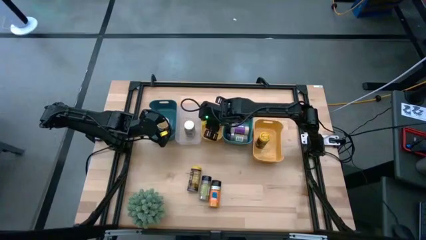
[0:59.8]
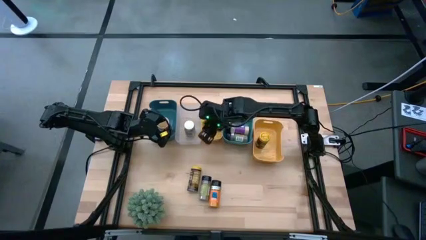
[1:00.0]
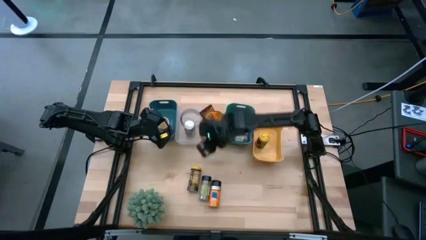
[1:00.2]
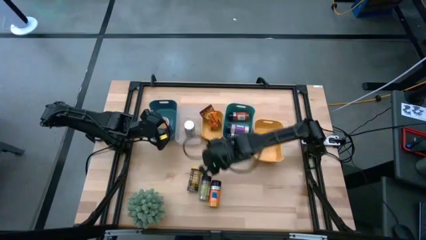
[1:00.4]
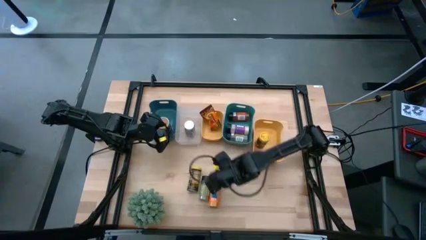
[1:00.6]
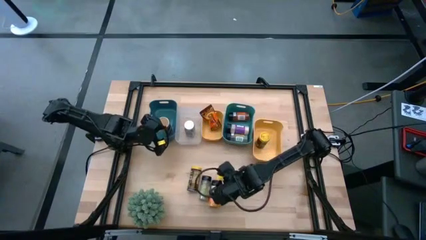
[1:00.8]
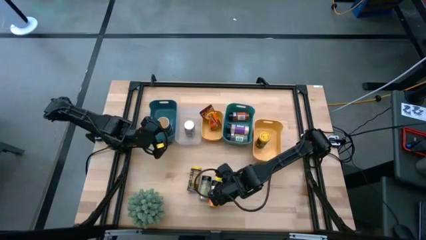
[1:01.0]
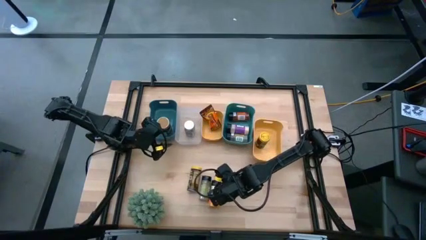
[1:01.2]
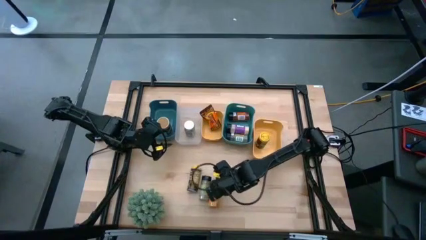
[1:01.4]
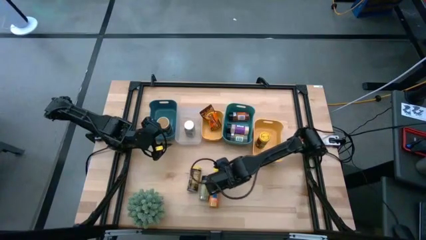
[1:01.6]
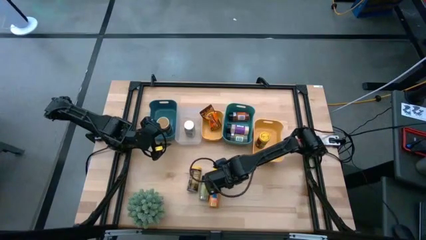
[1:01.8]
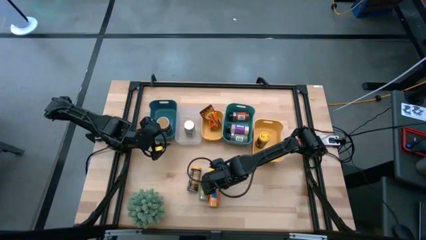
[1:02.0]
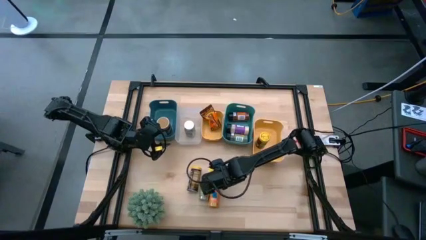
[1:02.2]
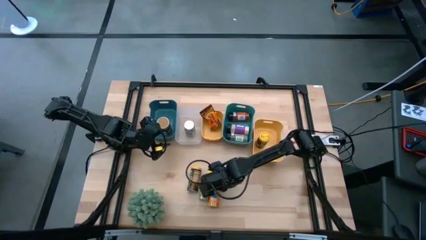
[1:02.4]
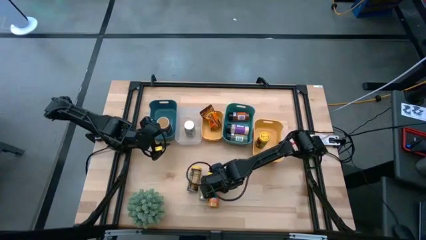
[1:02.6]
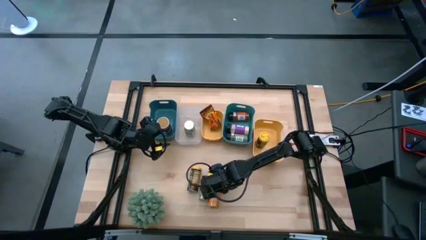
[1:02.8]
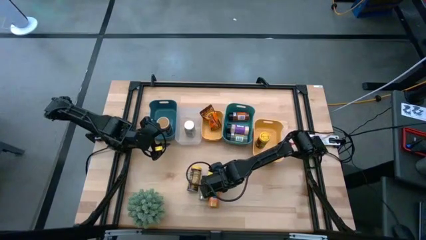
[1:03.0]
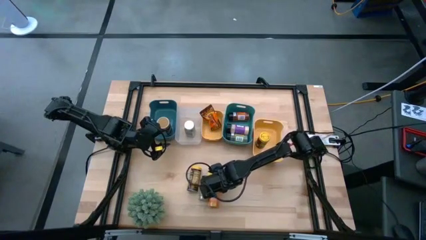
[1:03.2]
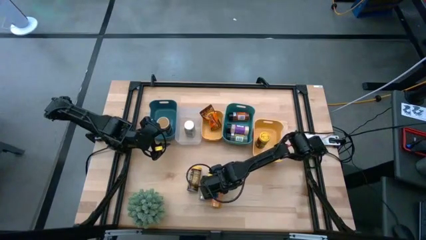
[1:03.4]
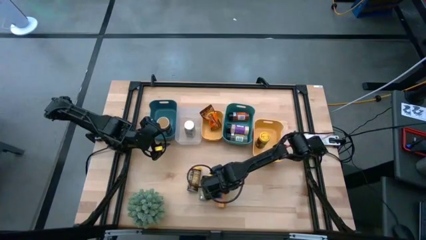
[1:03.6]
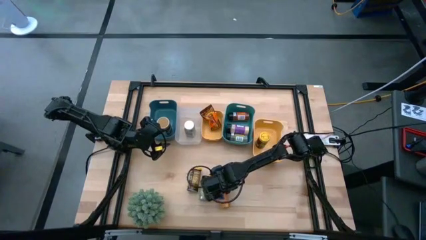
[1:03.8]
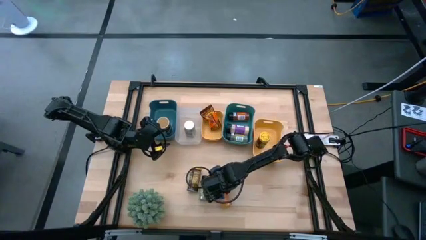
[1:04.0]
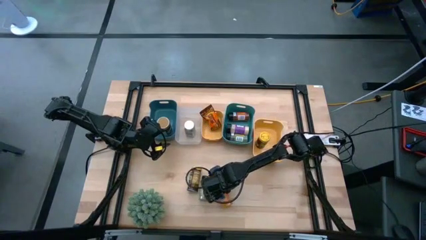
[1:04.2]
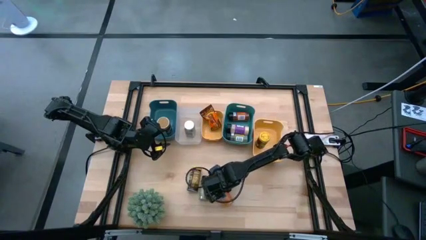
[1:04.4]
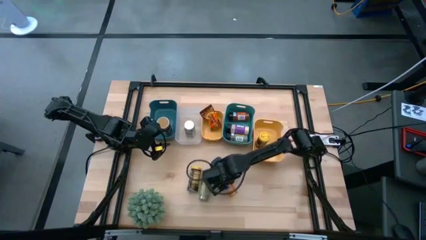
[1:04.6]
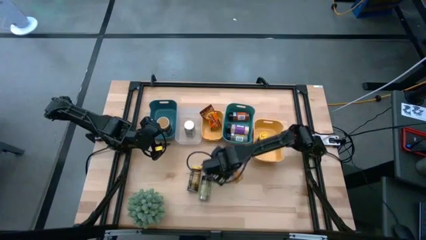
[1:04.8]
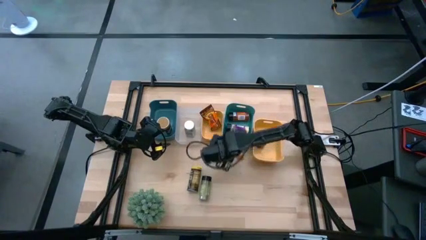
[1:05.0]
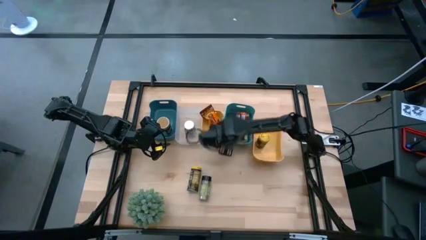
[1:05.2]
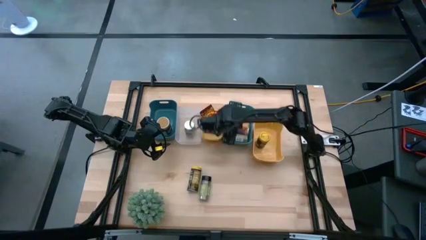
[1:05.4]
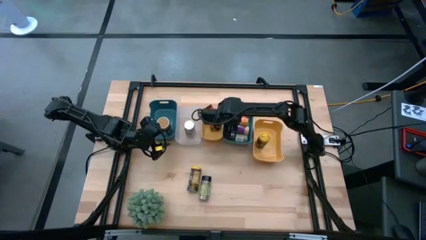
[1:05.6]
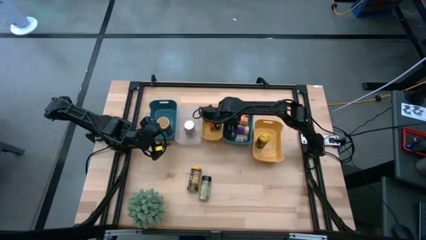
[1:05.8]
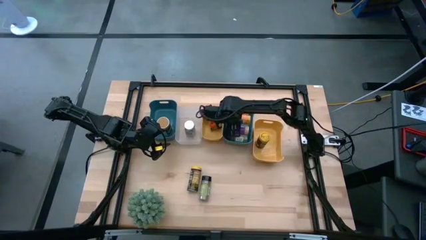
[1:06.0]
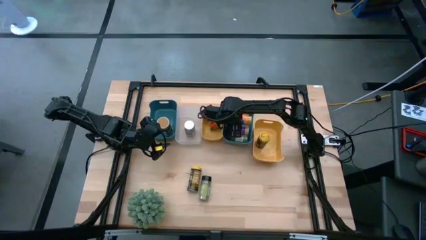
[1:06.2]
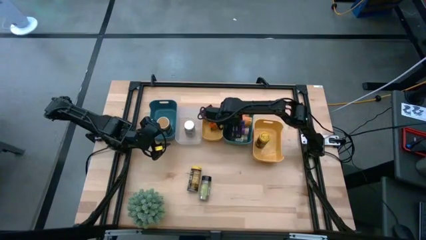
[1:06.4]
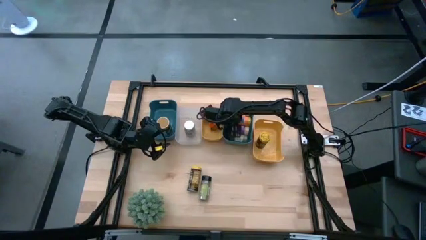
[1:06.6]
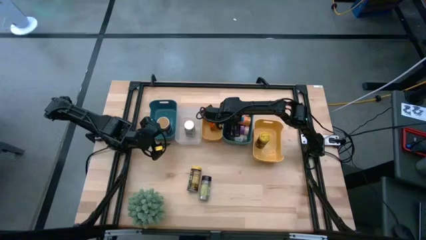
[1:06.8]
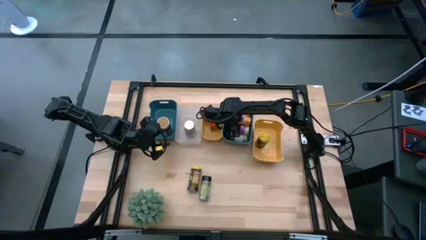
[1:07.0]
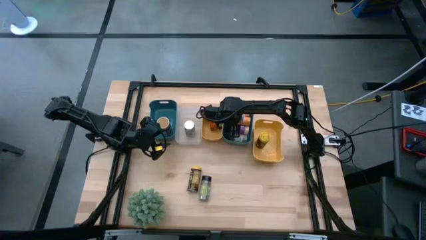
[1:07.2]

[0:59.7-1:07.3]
Task: Sort spices by type
Put the black seasoning bottle into the green bin

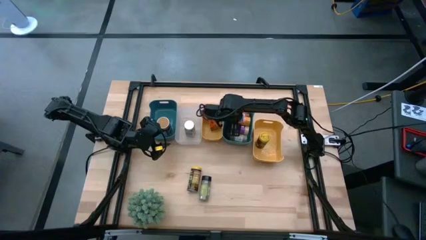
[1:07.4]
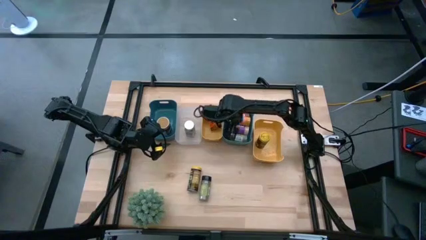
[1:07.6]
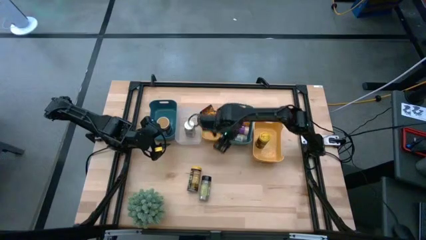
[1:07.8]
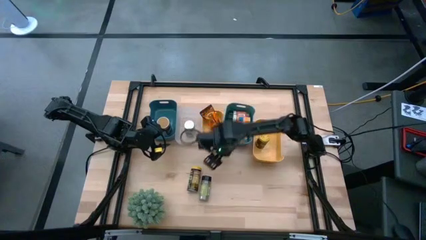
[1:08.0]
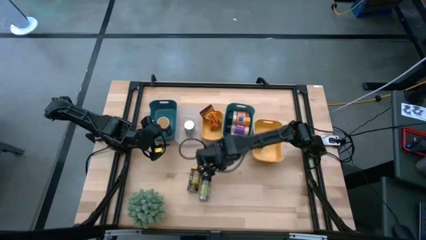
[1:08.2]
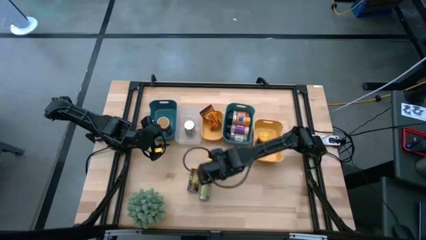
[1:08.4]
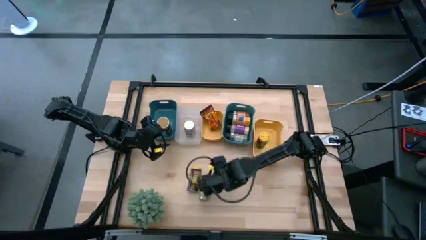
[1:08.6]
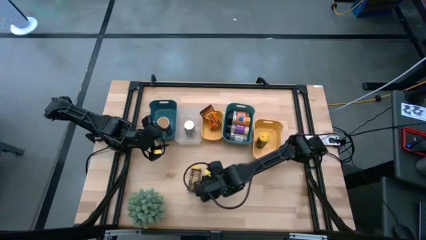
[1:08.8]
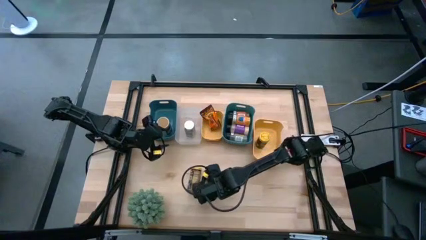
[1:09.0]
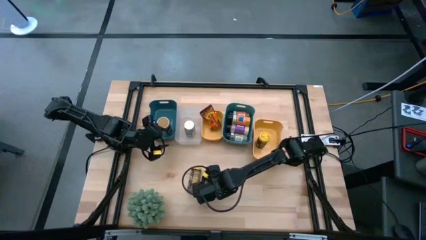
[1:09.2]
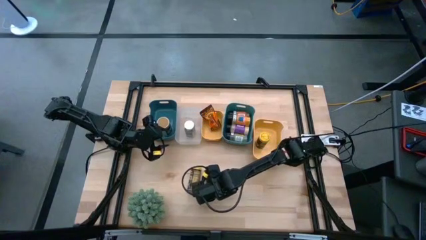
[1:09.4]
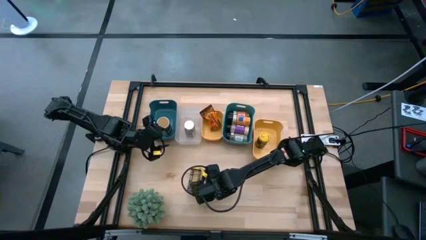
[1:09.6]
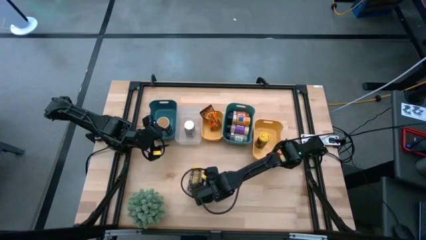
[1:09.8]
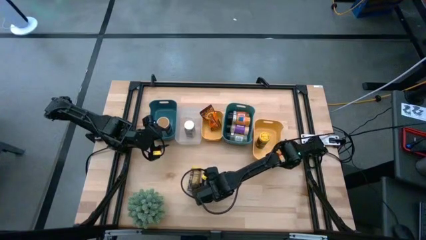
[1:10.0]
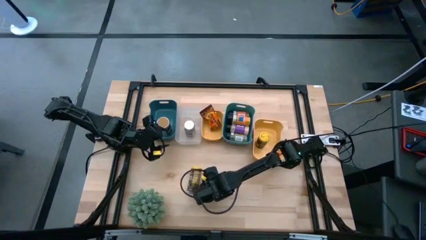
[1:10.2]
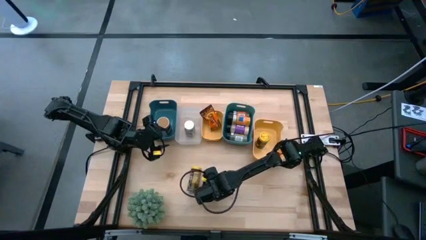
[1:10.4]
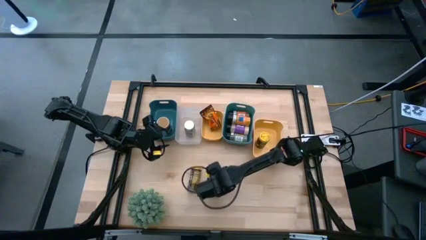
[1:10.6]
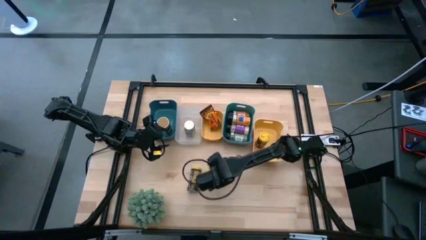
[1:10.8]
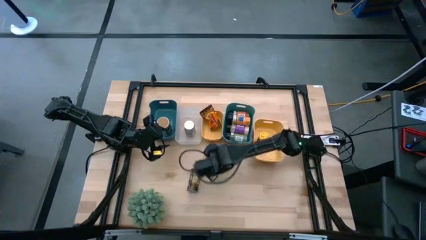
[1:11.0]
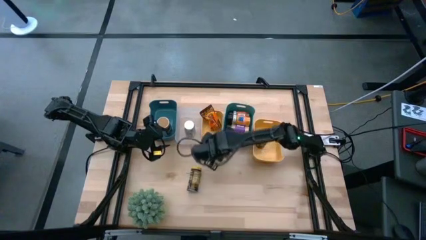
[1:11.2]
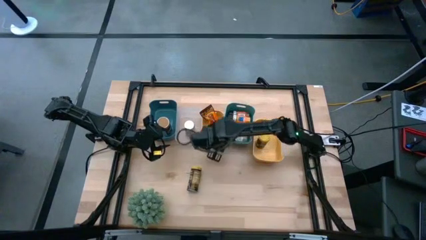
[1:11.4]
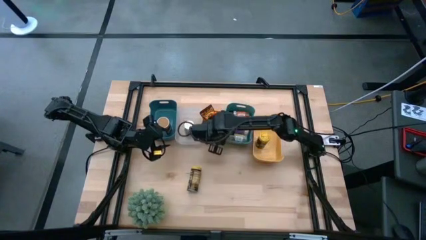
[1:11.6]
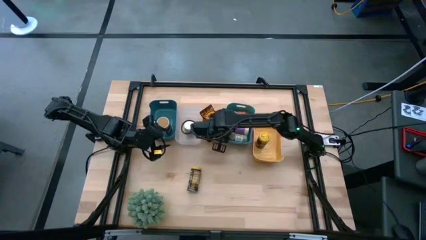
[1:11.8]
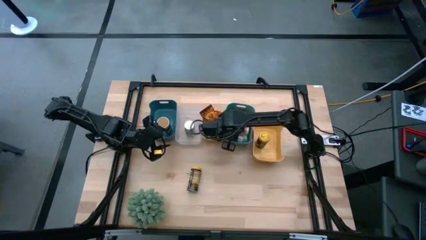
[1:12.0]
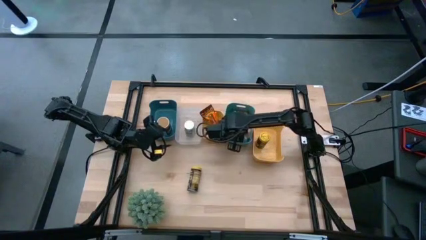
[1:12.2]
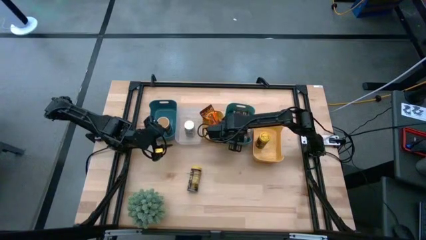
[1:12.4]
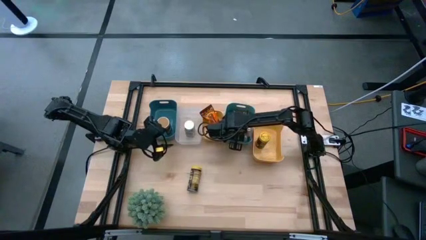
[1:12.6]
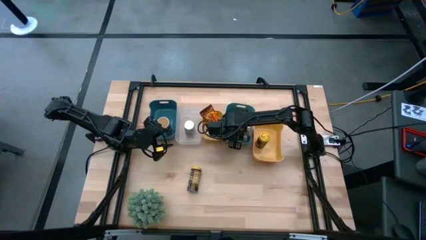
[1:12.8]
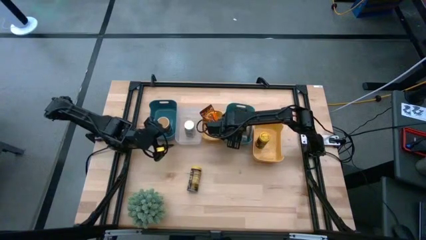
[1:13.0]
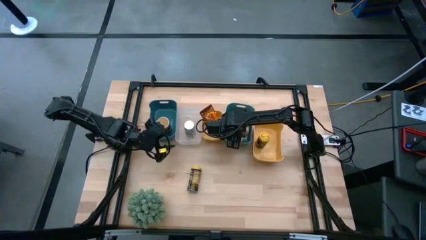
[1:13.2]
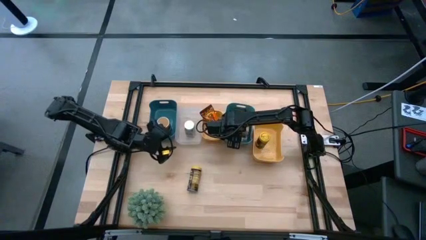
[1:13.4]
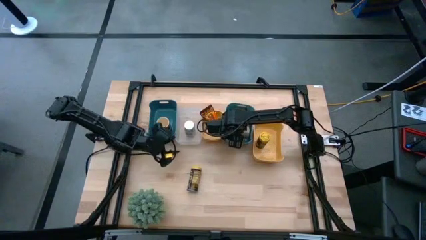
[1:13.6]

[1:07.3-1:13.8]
Put the black seasoning bottle into the green bin
